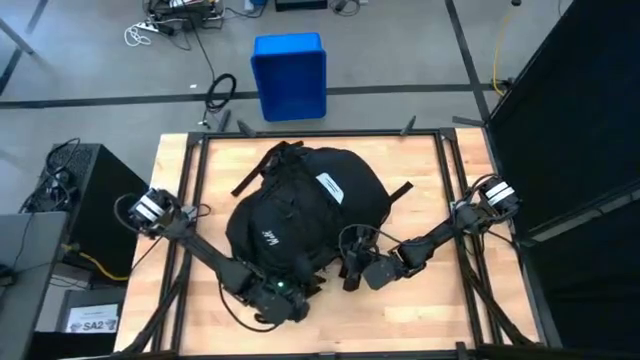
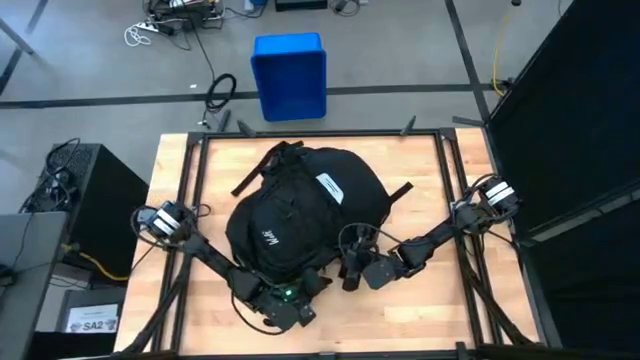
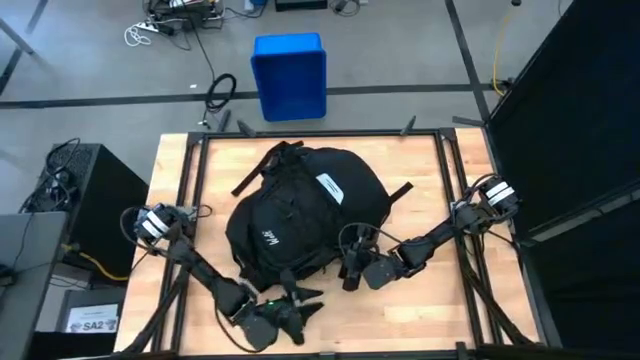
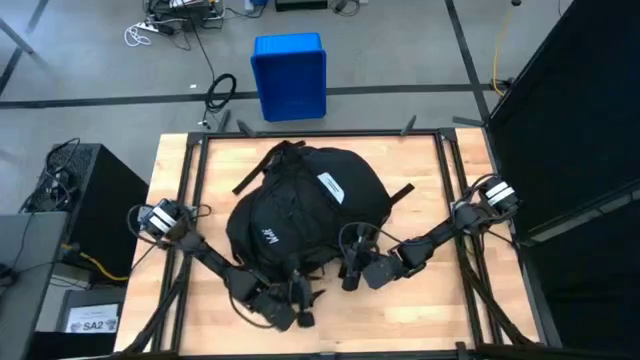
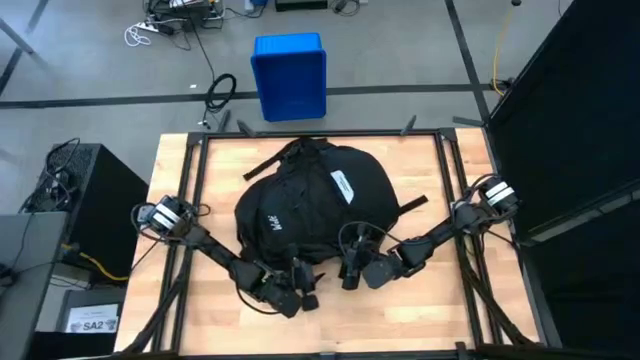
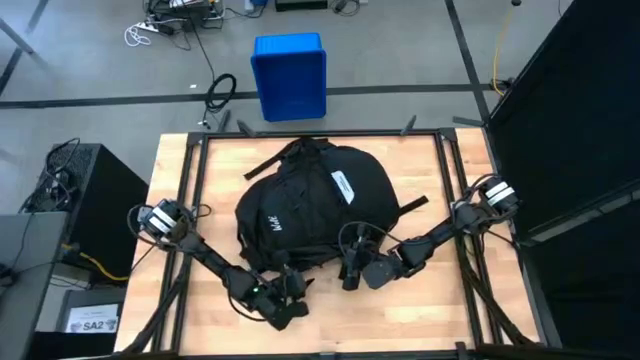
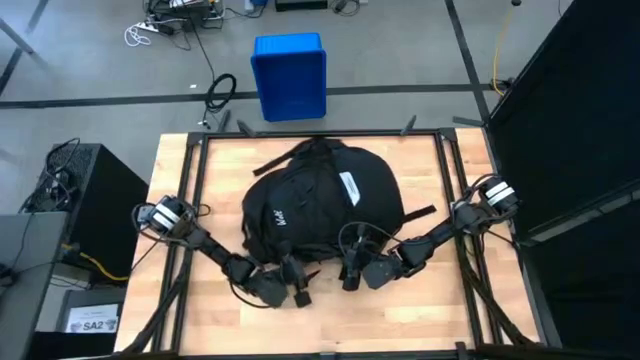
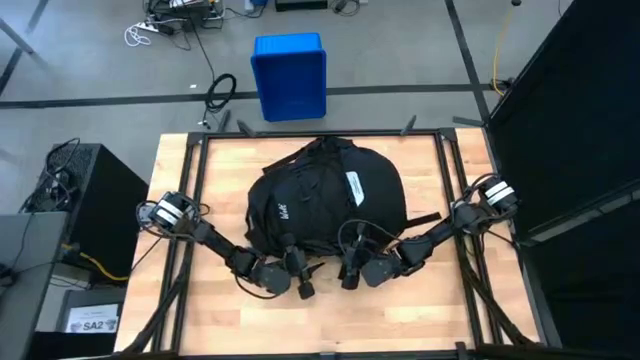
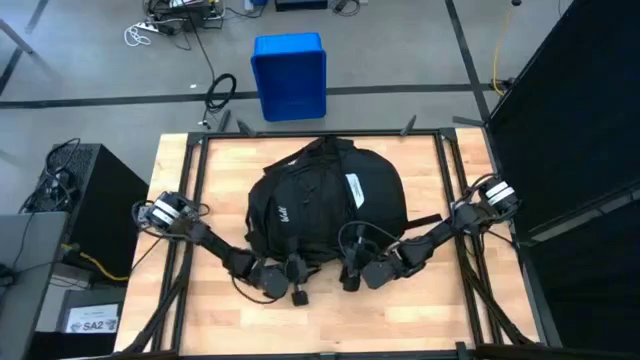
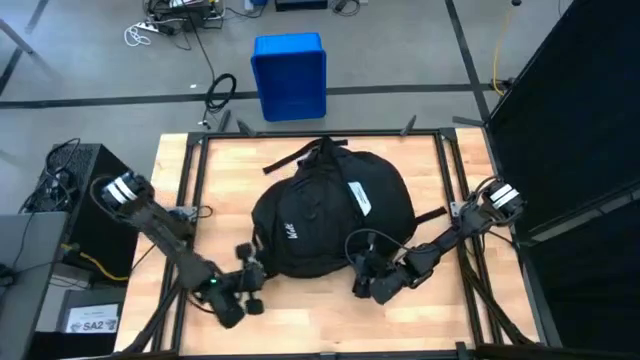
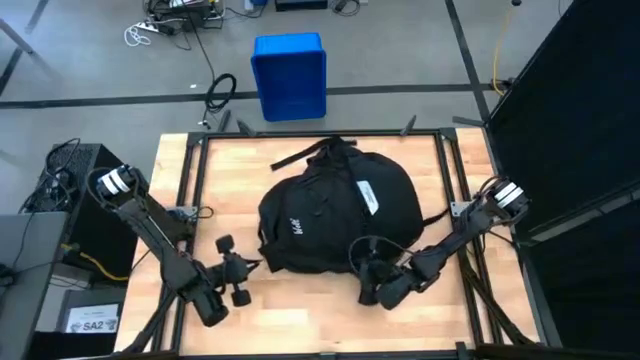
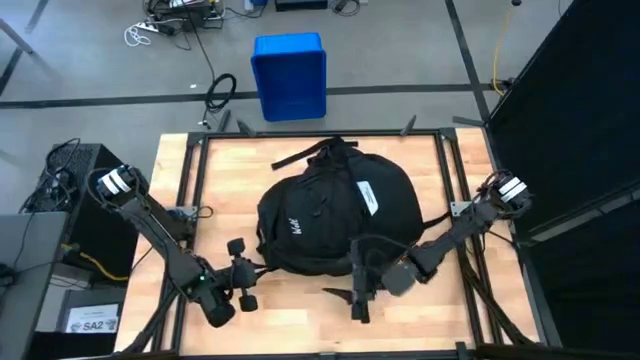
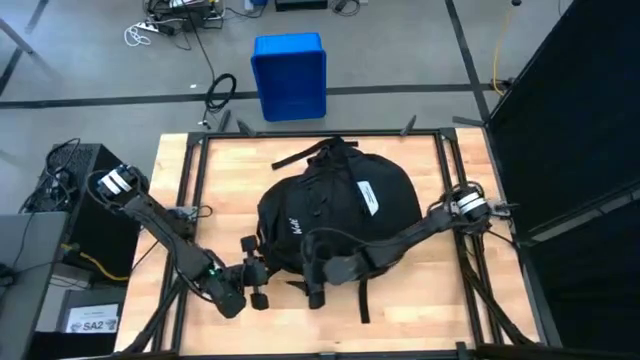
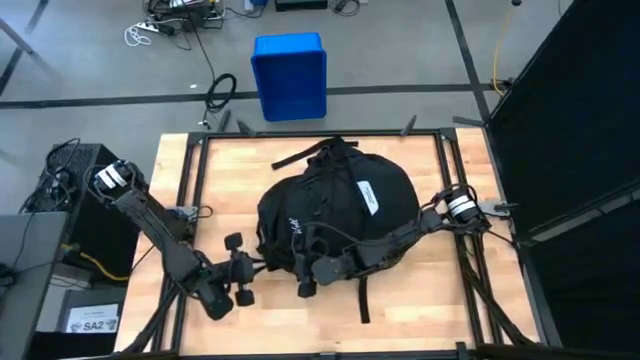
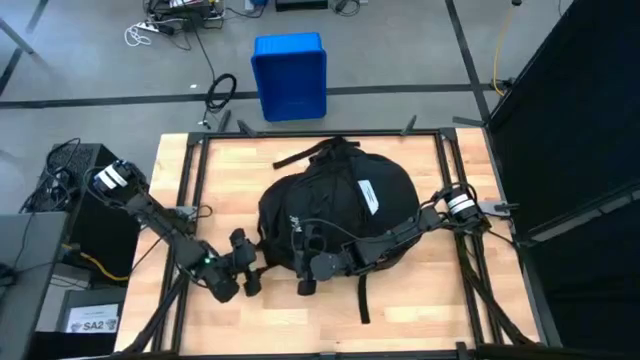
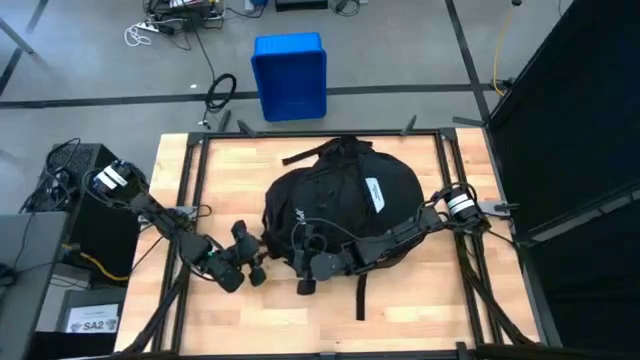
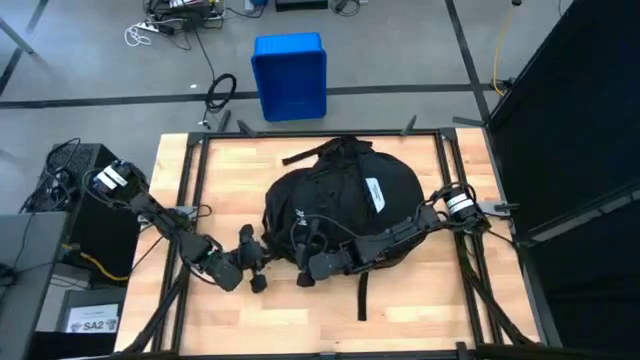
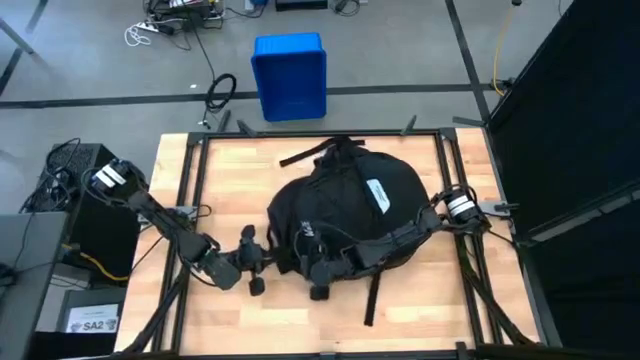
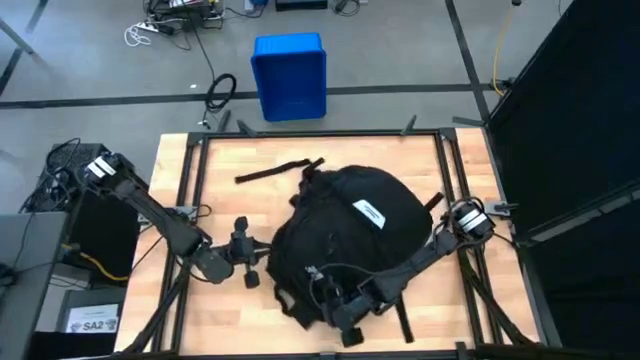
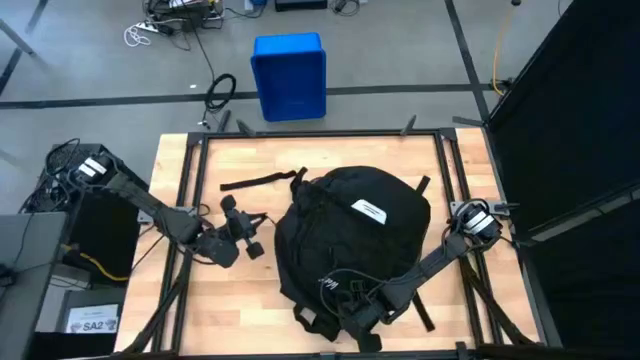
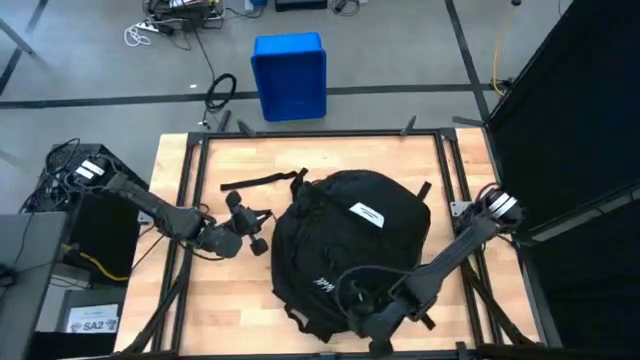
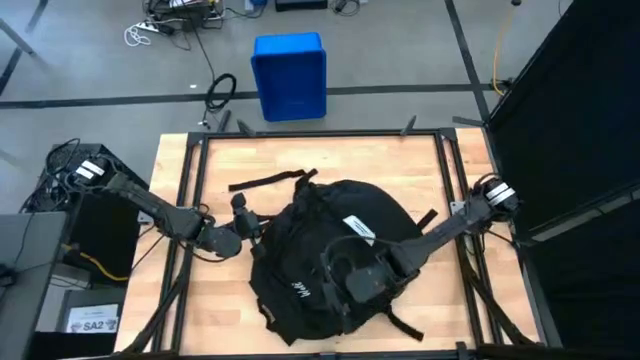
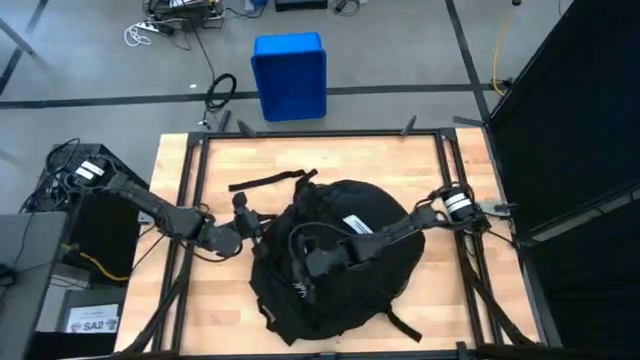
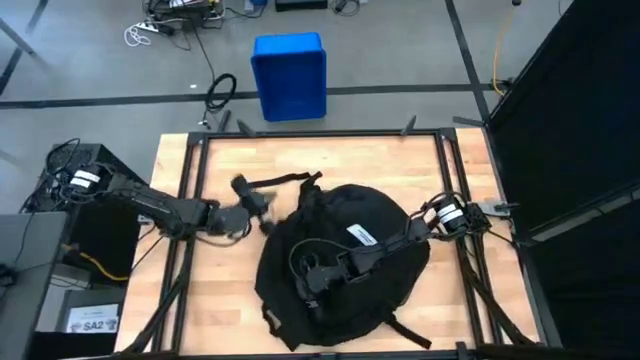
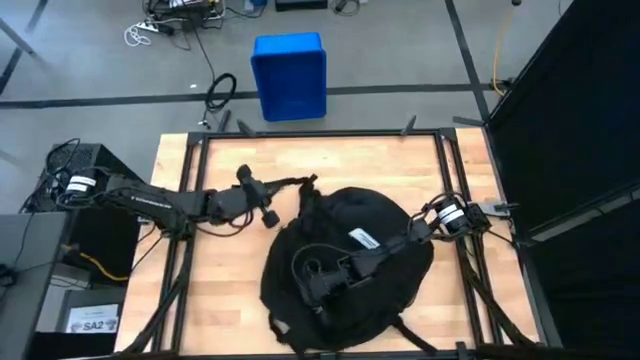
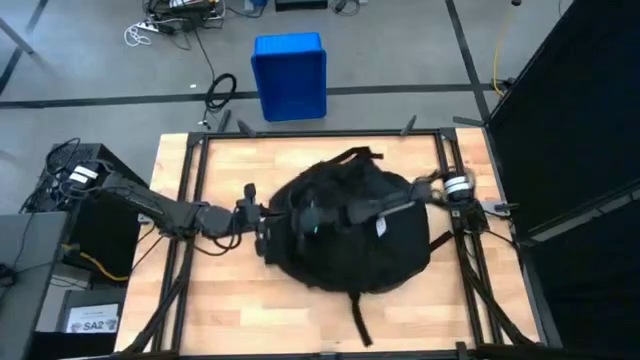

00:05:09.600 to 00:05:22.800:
Task: Unpack backpack
Close the backpack

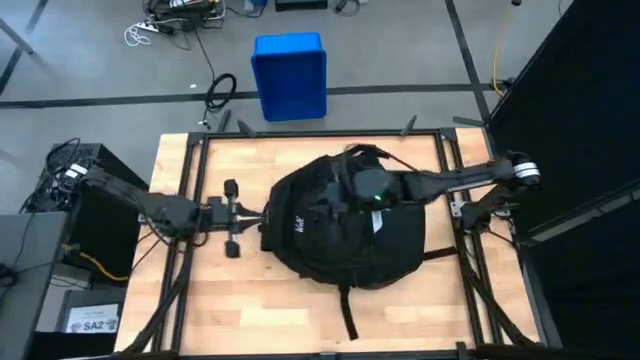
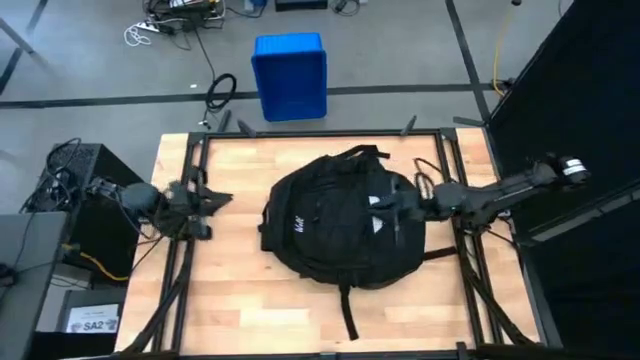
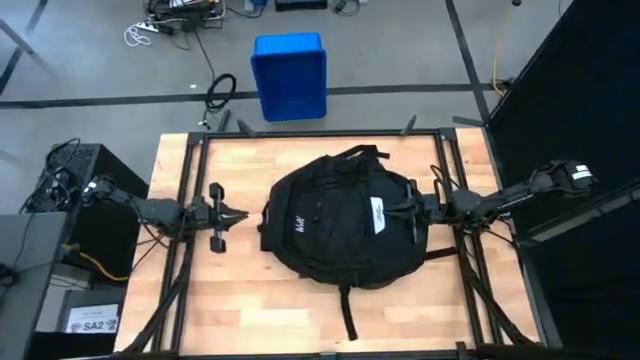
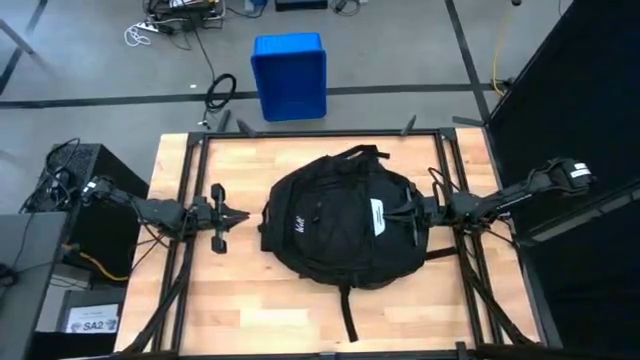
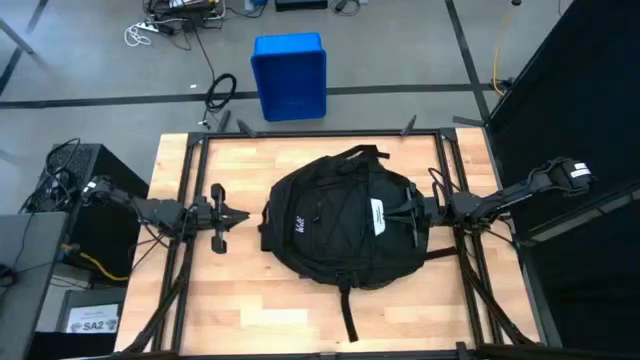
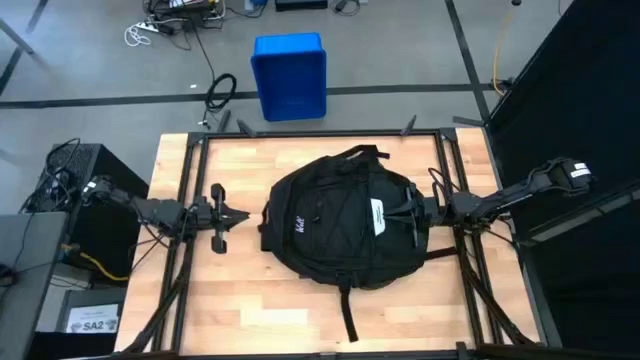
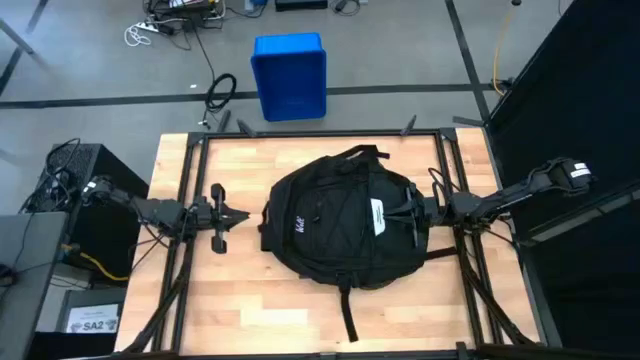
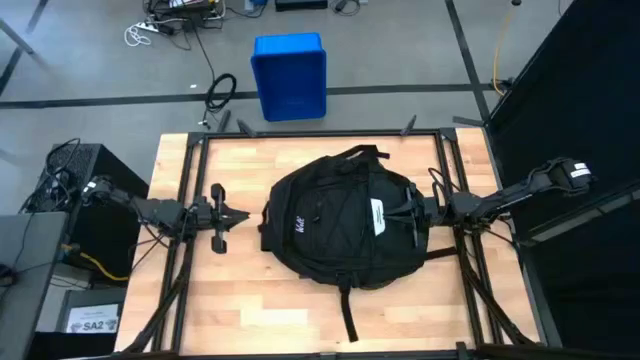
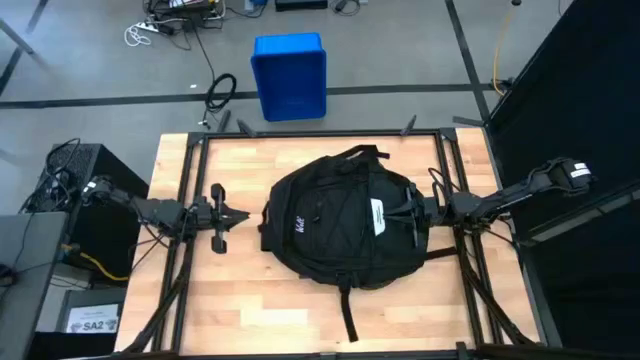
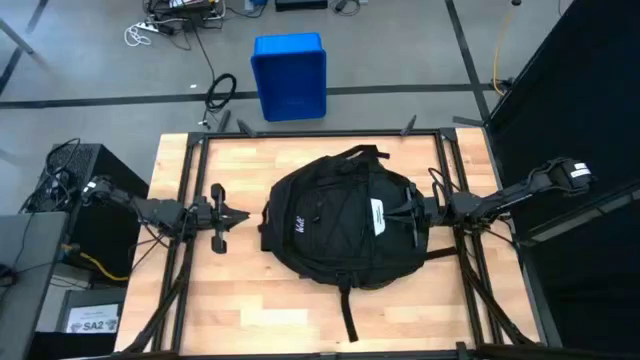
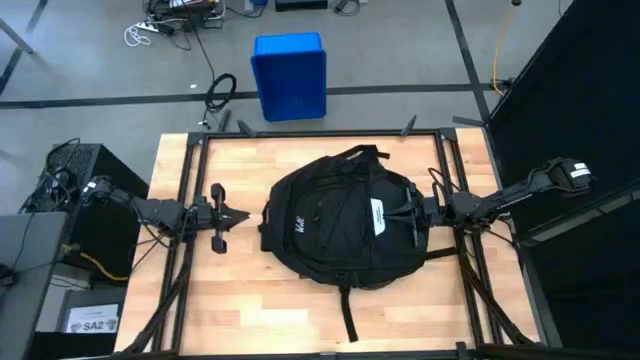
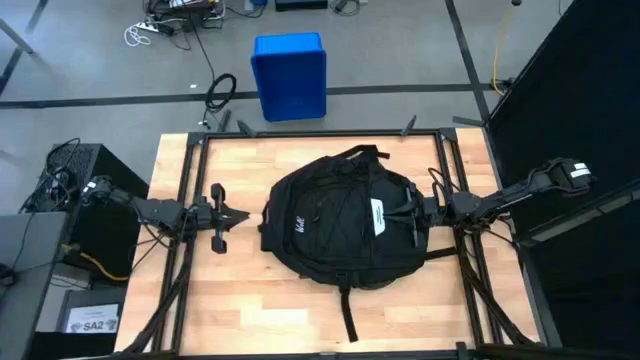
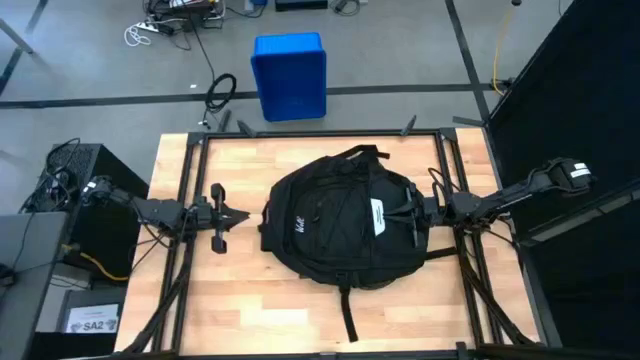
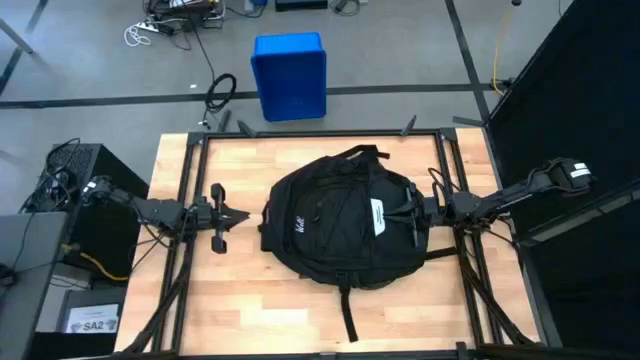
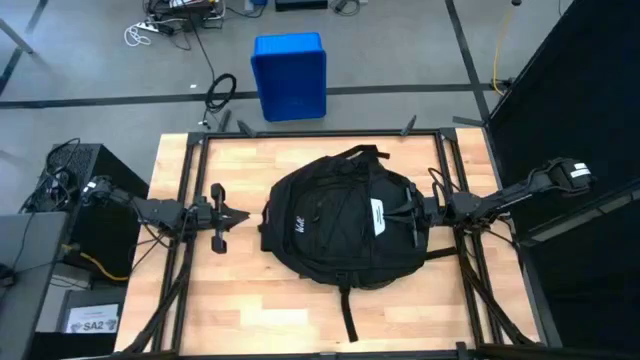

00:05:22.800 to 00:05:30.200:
Return to Home Position

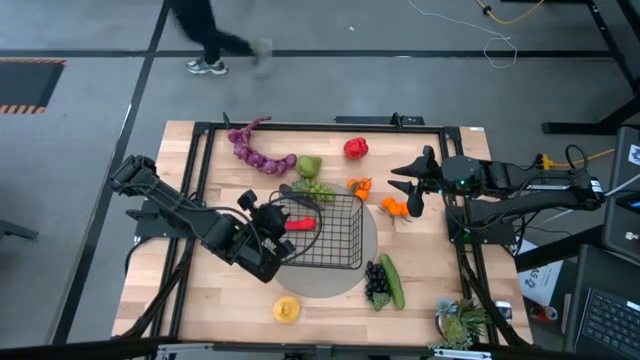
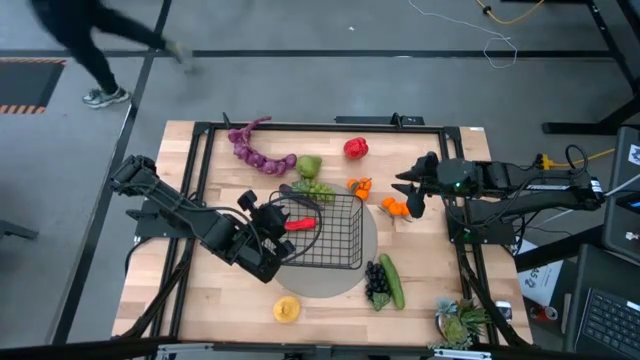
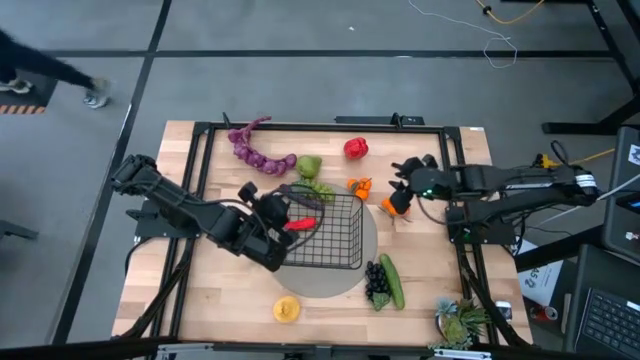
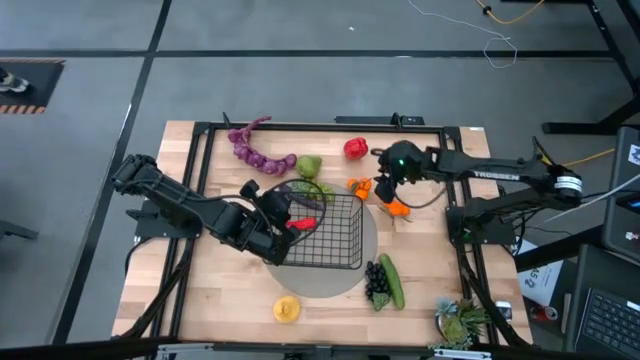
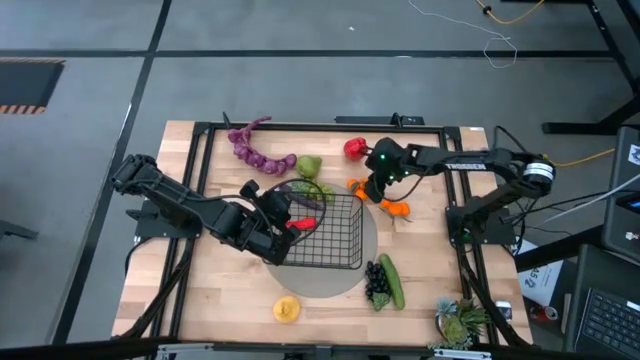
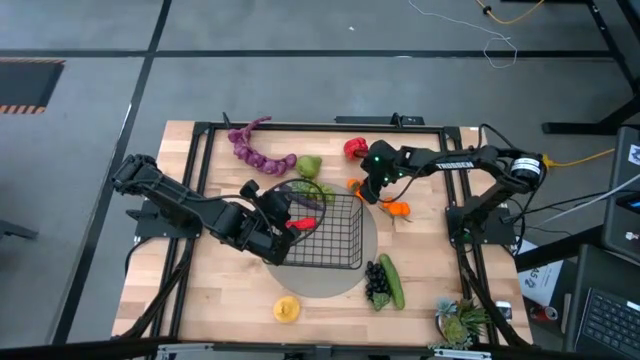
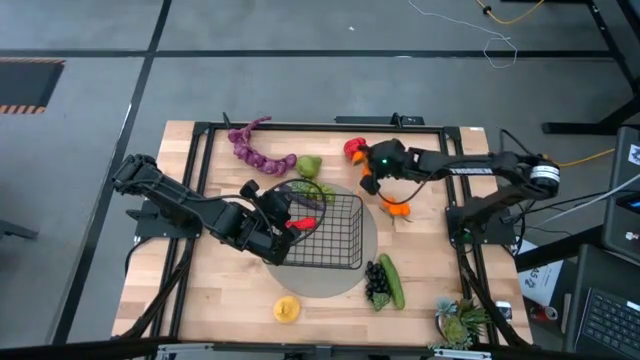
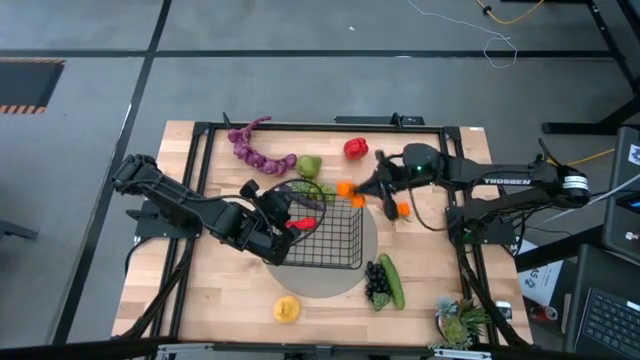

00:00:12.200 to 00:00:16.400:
Task: Build produce basket
Put the left tangerines into the black wire basket
